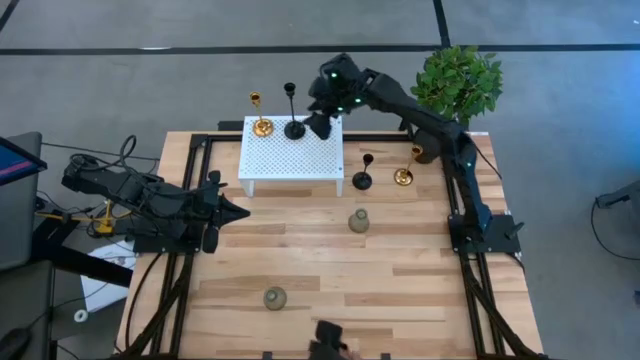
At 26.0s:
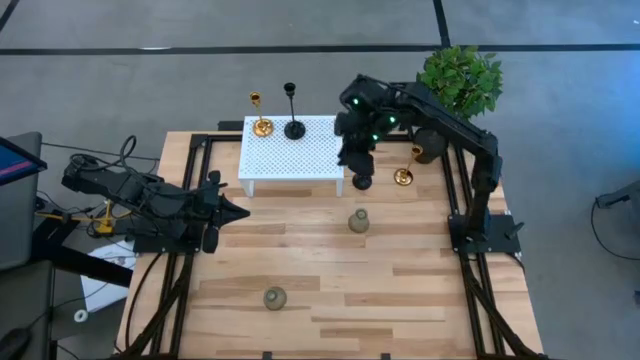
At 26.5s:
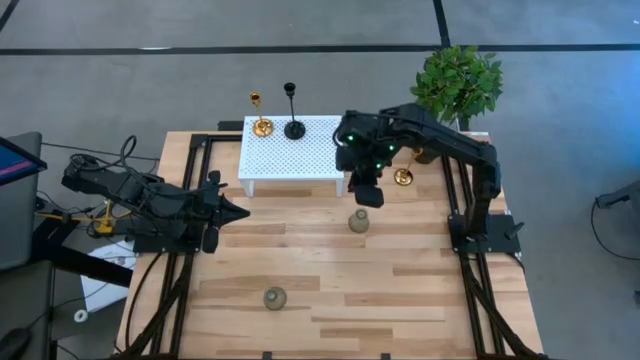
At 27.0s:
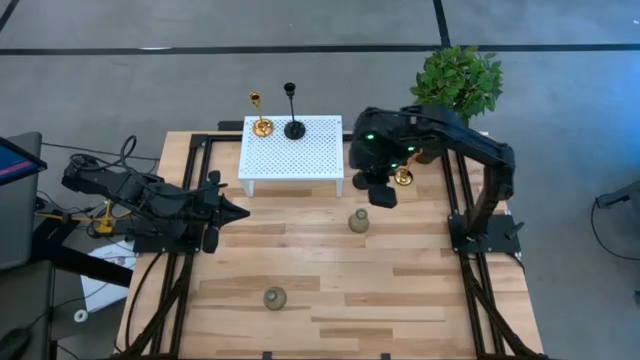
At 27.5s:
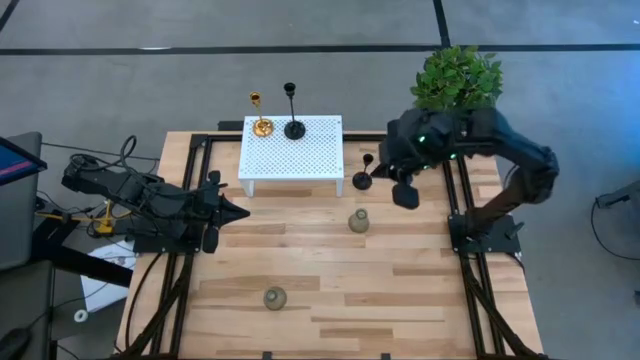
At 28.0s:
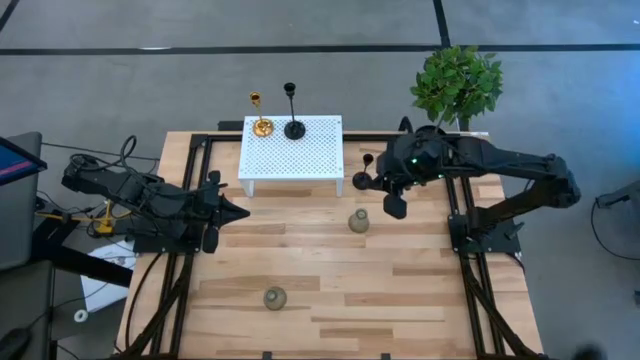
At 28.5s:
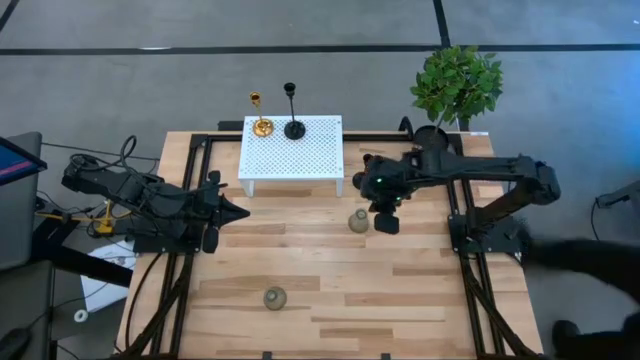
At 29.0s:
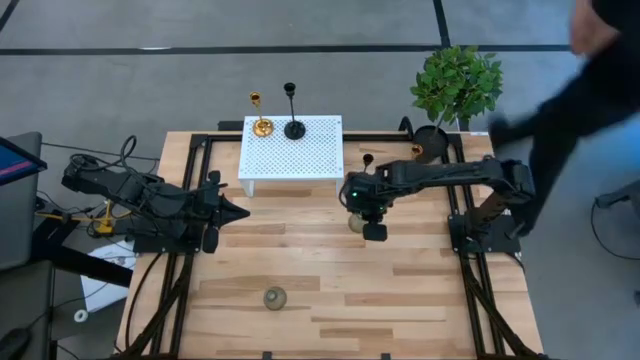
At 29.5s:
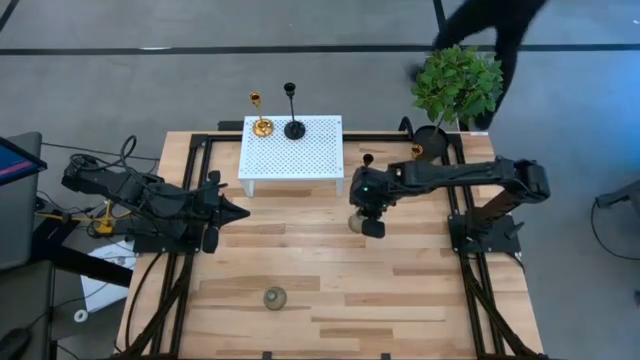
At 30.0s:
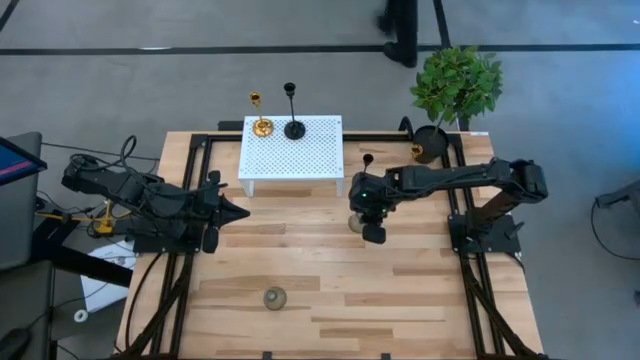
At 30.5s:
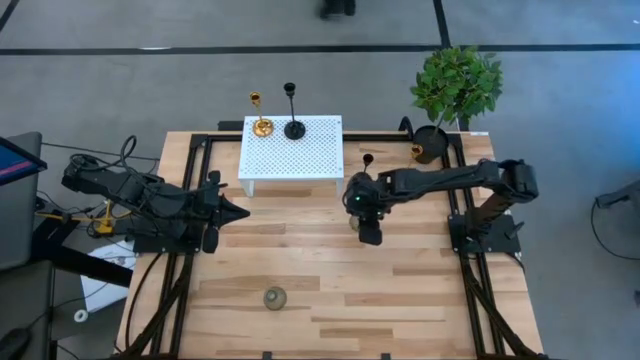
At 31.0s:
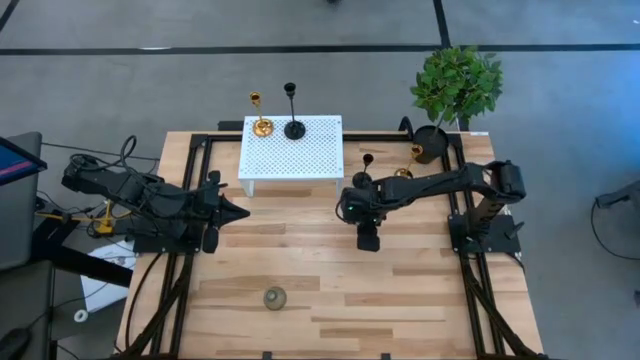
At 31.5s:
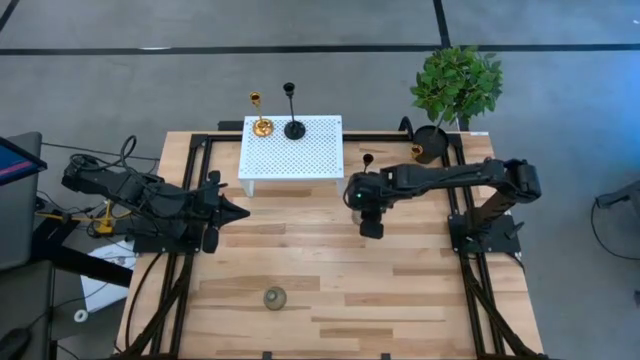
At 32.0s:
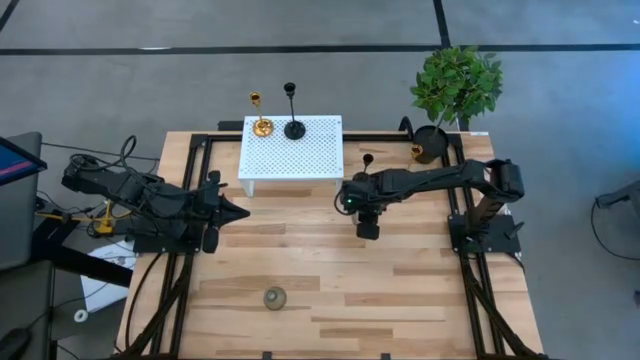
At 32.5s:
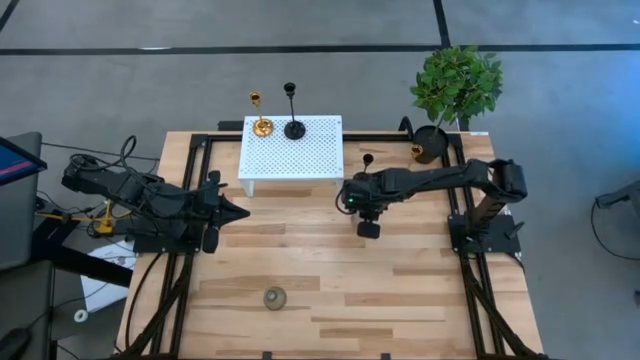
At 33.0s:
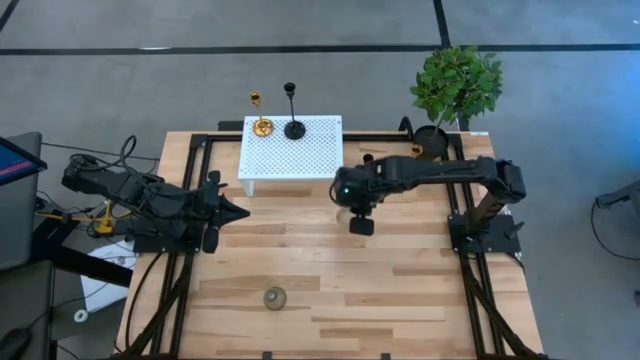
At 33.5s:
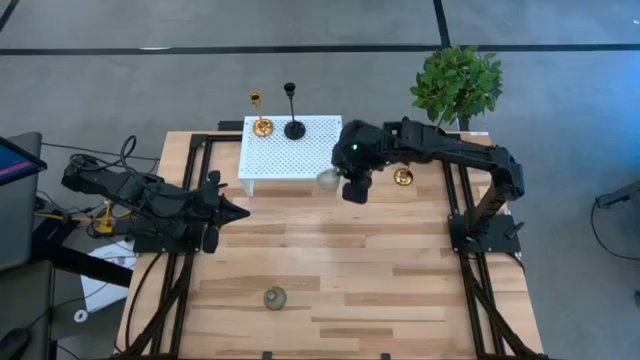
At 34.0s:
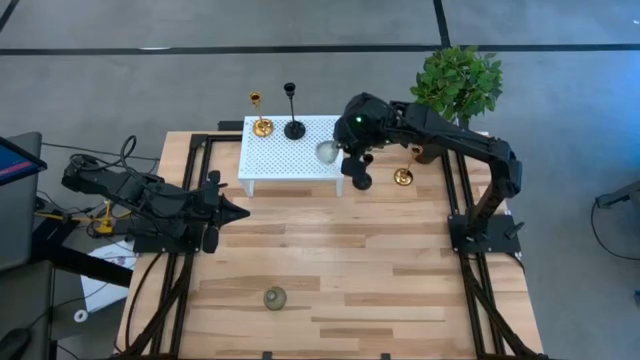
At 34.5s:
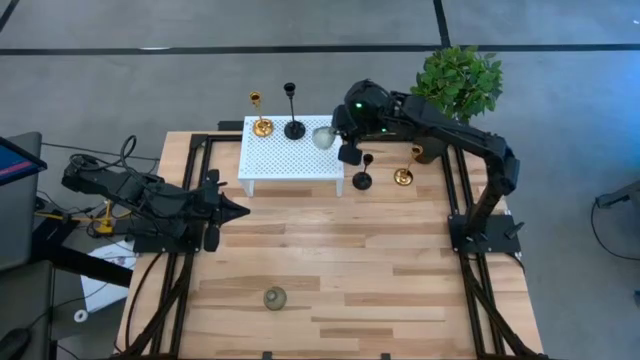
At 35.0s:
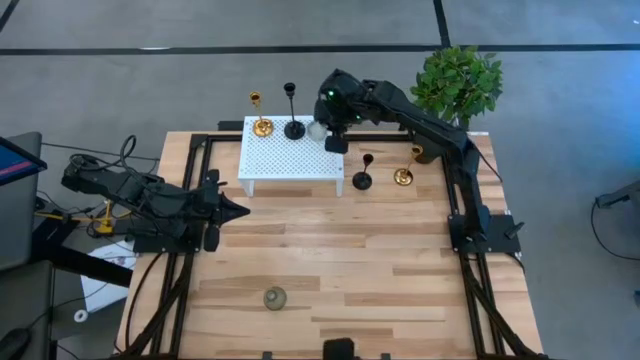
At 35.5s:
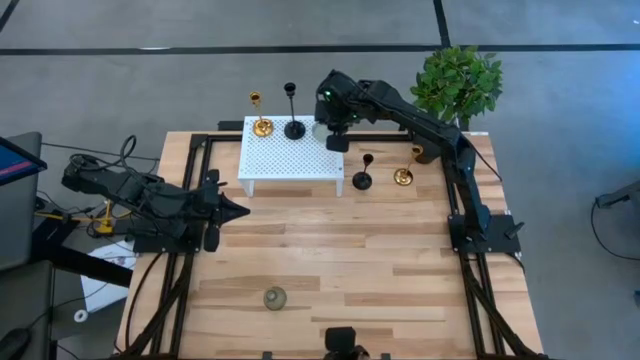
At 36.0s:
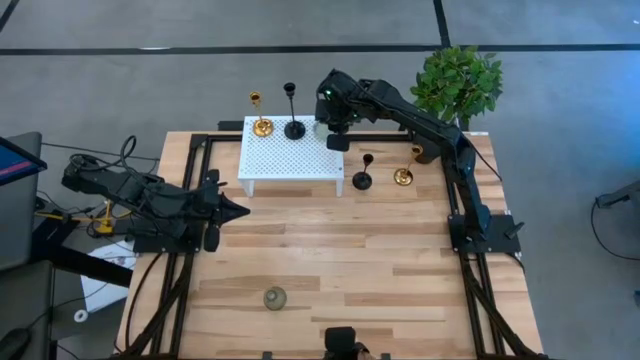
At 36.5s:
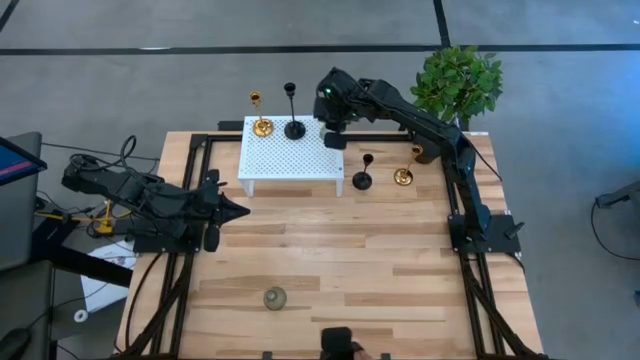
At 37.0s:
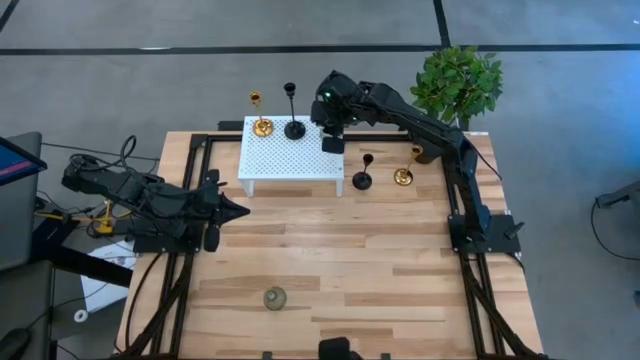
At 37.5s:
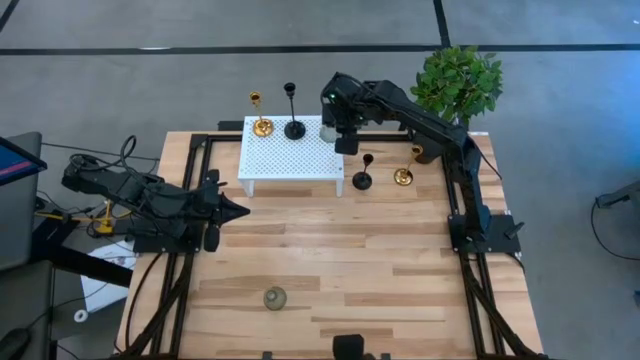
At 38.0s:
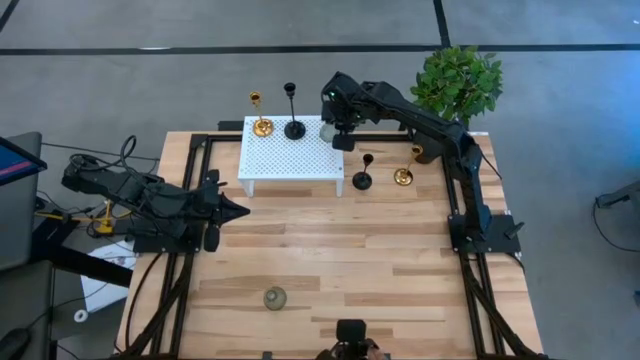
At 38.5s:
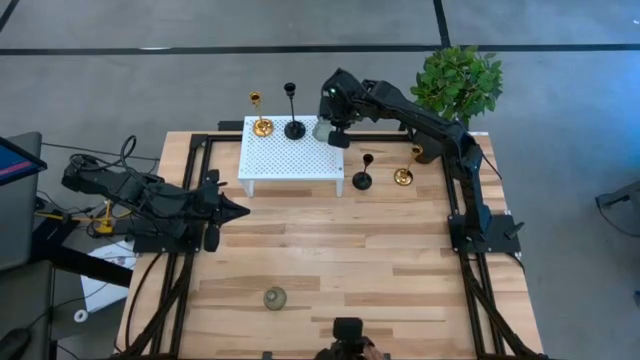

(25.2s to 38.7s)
Task: Pick & Place candle stick holders
Put the top transparent candle holder on the shelf

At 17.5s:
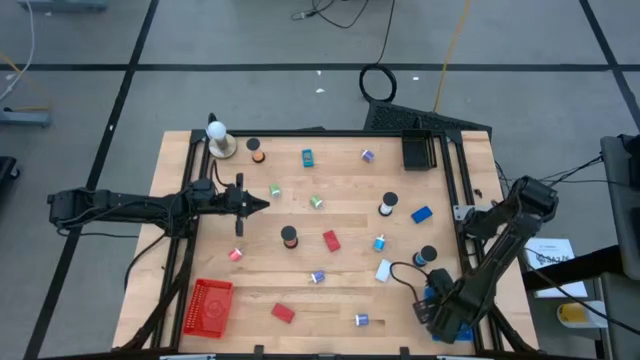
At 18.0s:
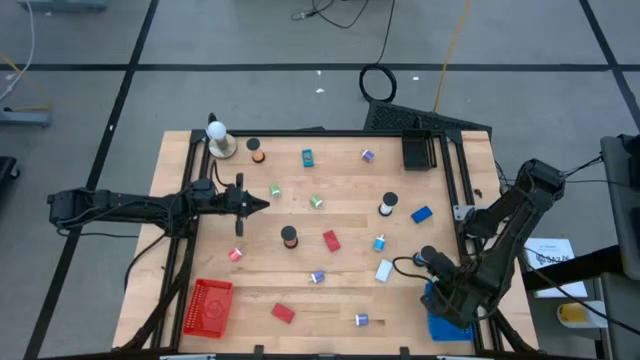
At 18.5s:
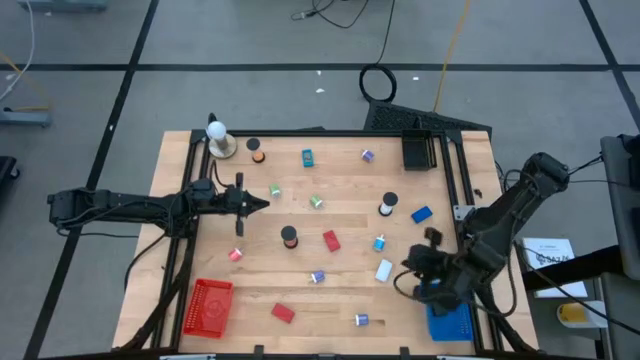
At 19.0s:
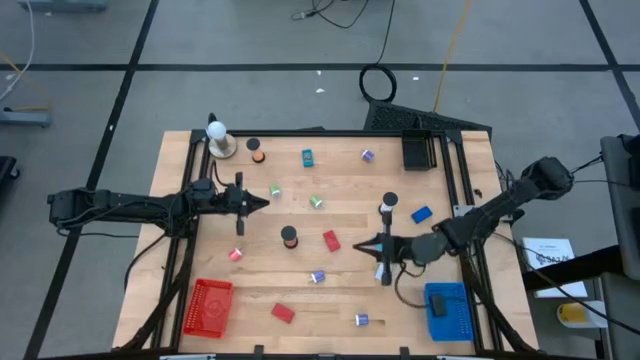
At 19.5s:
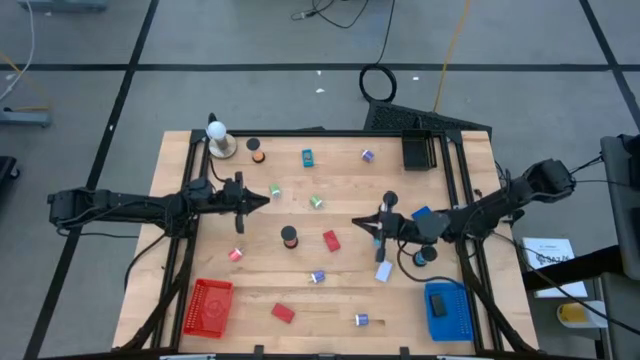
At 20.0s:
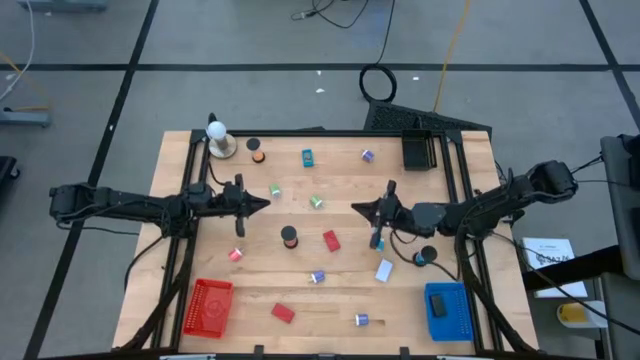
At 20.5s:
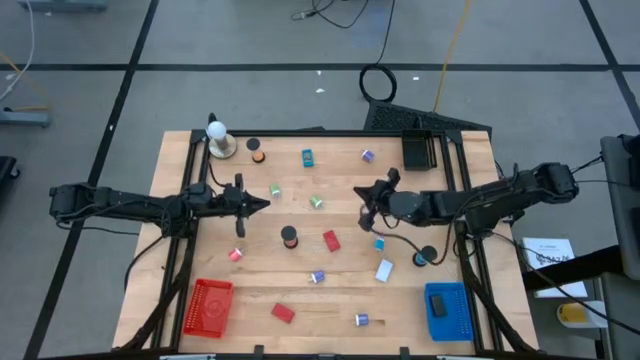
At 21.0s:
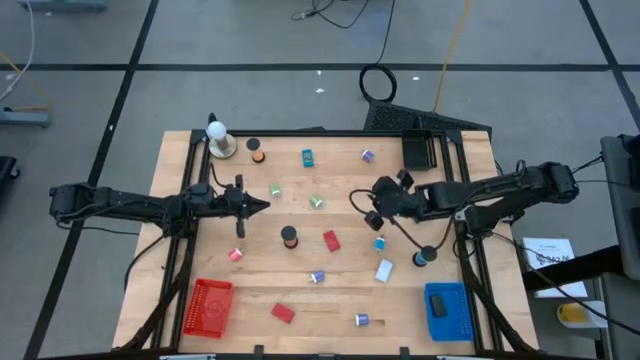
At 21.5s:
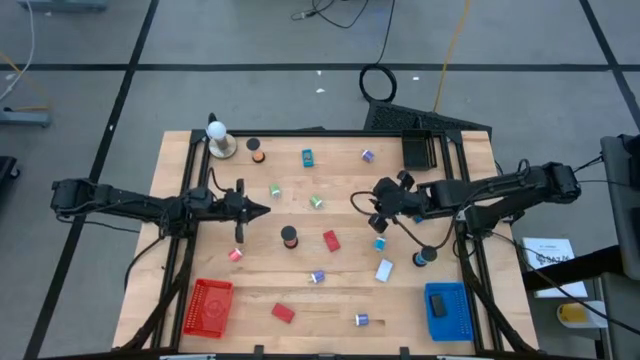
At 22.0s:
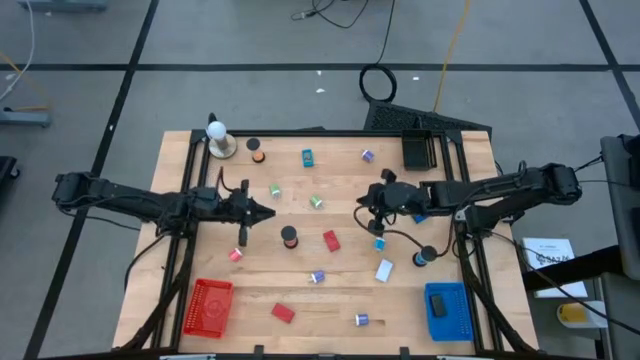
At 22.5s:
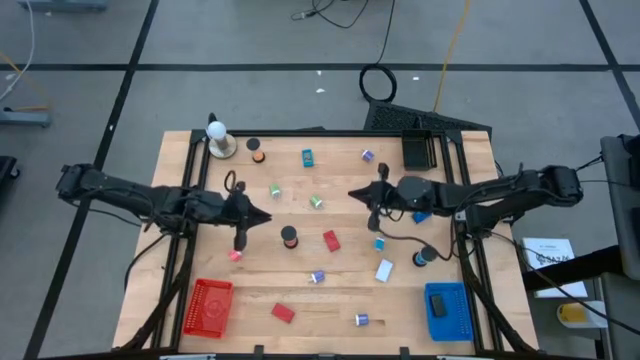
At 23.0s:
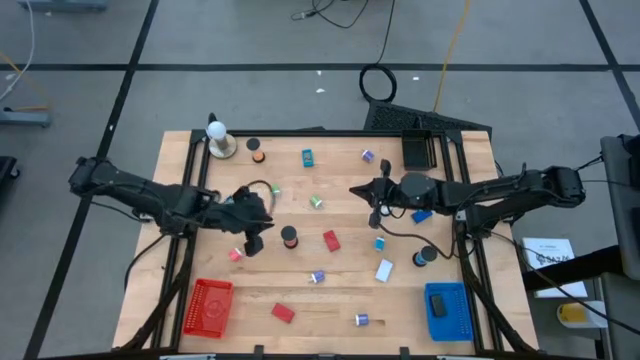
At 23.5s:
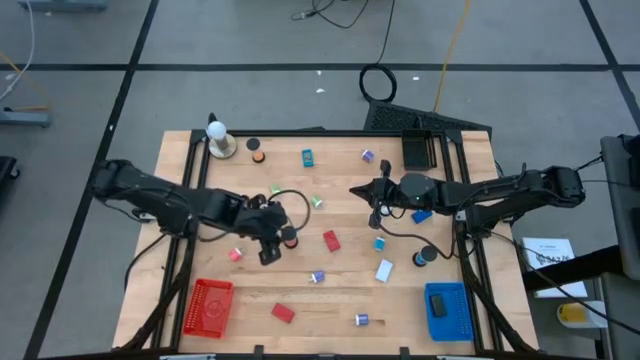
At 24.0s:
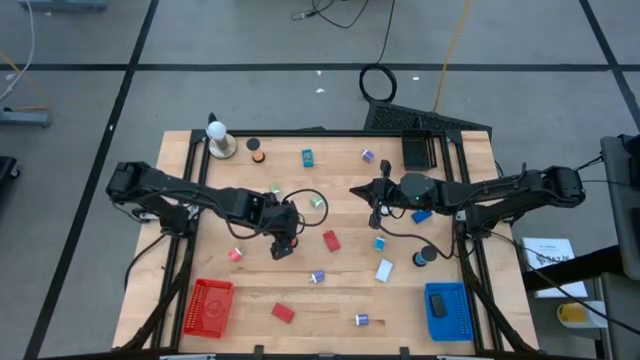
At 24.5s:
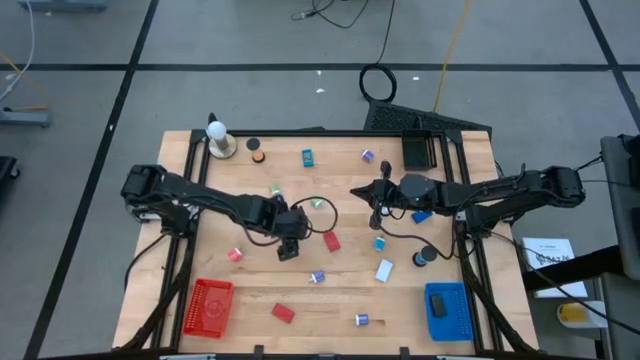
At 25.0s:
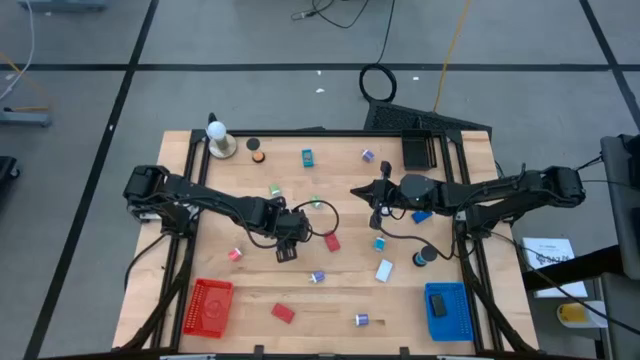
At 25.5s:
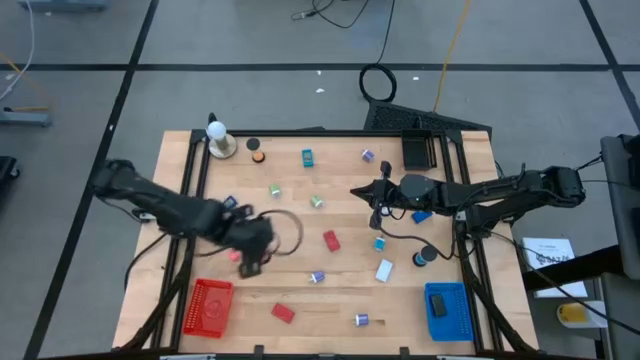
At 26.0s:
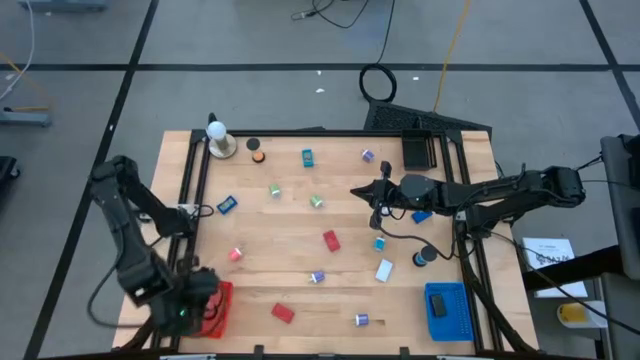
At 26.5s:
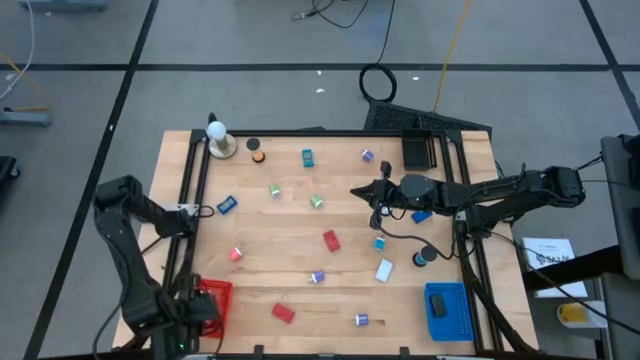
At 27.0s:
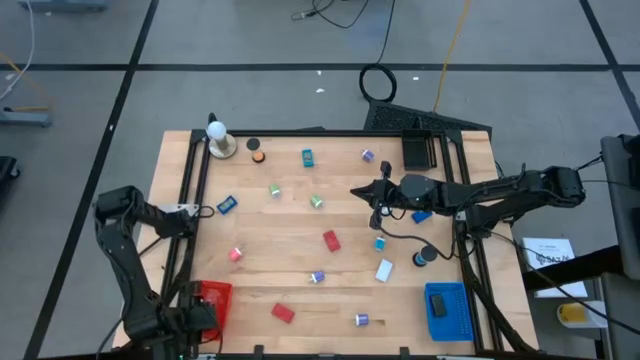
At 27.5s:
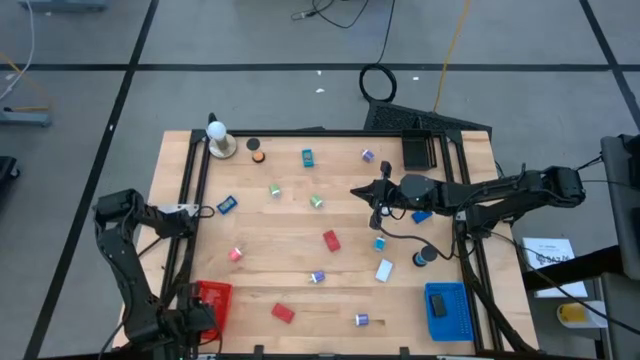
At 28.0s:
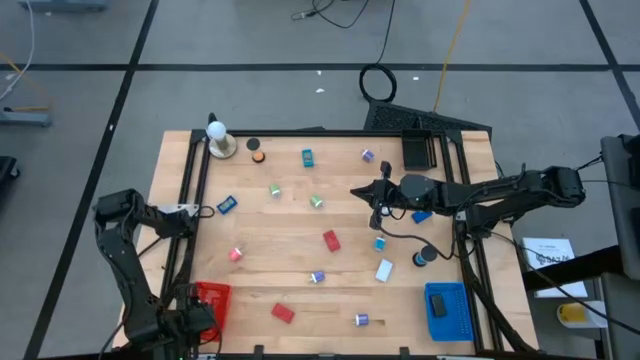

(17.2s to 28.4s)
Task: Pick & Place Office items
Put the pink hourglass into the red bin
